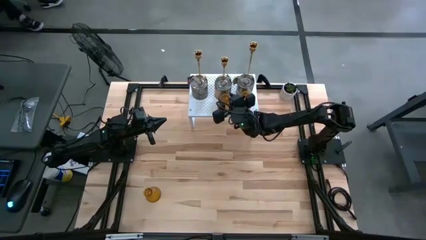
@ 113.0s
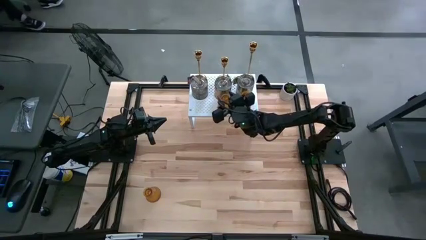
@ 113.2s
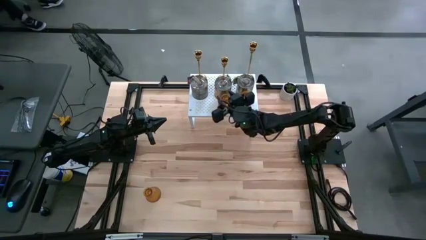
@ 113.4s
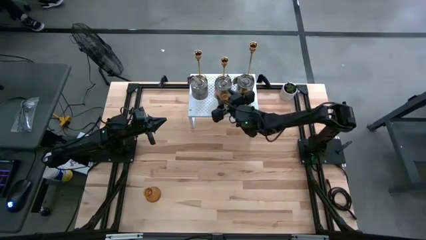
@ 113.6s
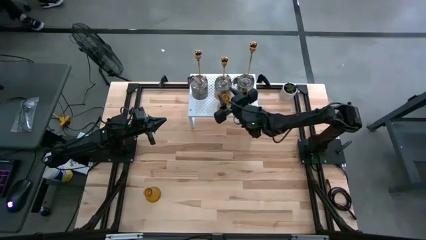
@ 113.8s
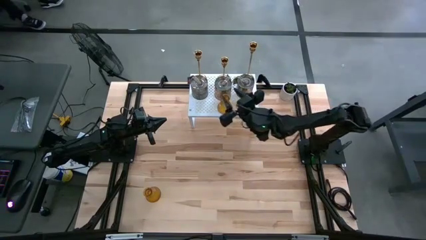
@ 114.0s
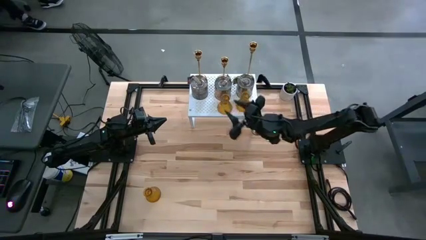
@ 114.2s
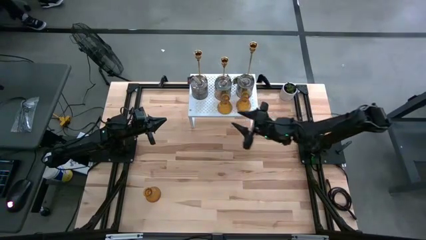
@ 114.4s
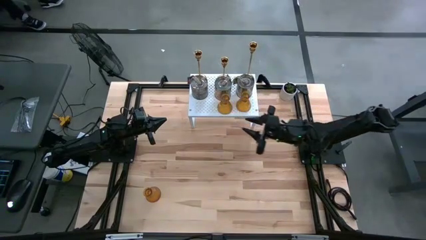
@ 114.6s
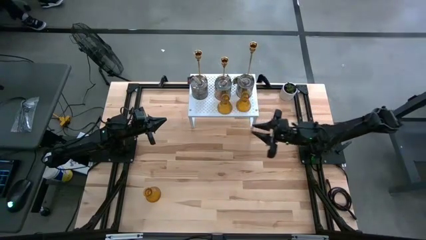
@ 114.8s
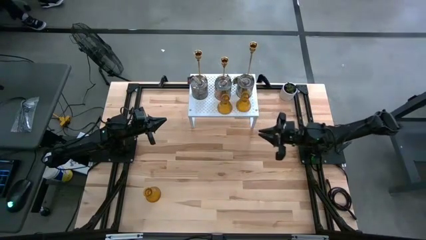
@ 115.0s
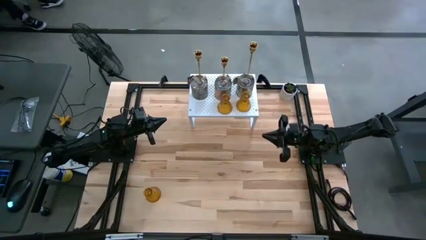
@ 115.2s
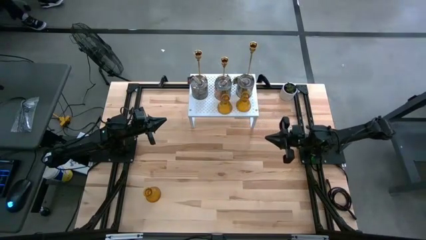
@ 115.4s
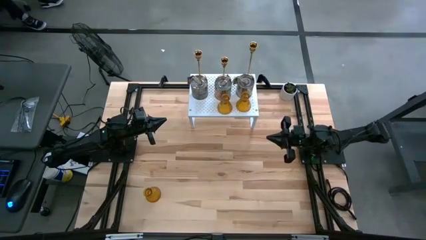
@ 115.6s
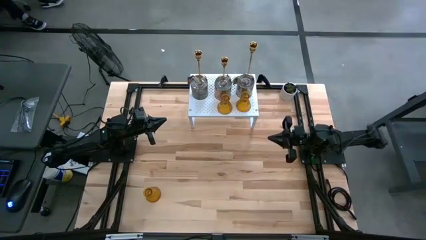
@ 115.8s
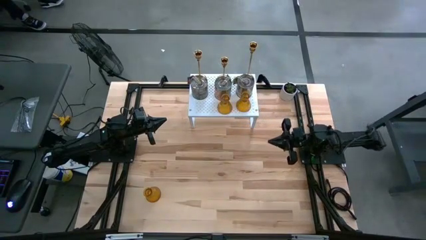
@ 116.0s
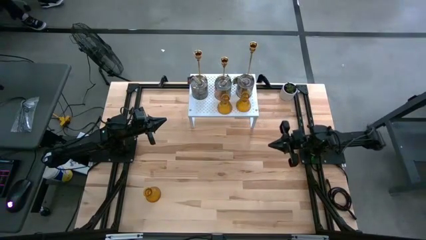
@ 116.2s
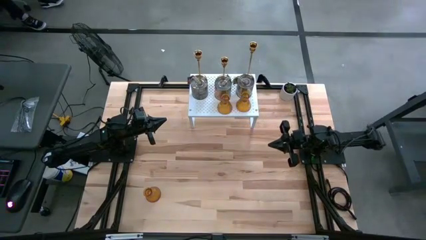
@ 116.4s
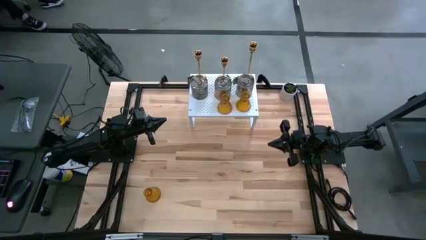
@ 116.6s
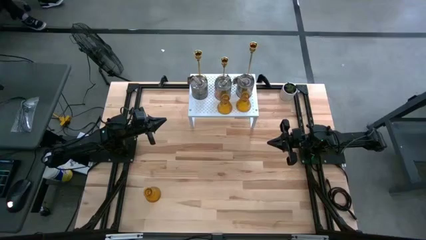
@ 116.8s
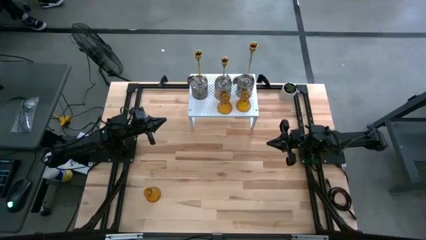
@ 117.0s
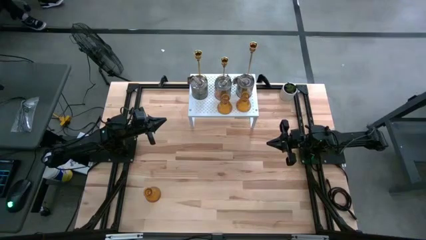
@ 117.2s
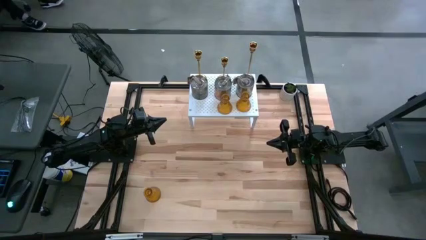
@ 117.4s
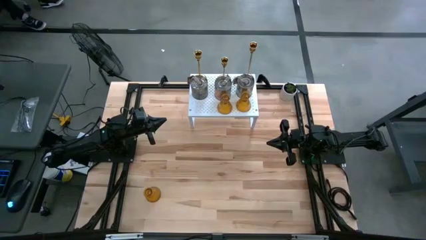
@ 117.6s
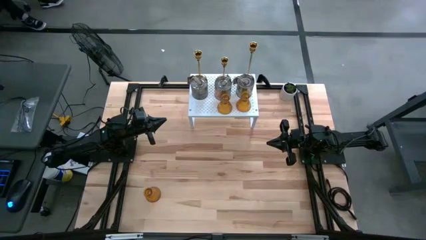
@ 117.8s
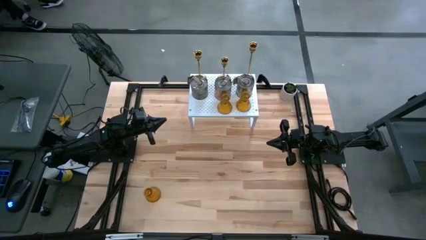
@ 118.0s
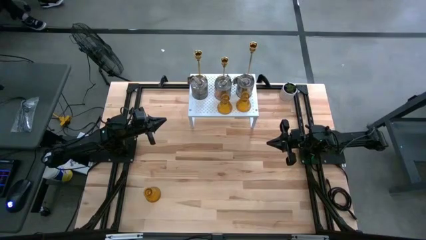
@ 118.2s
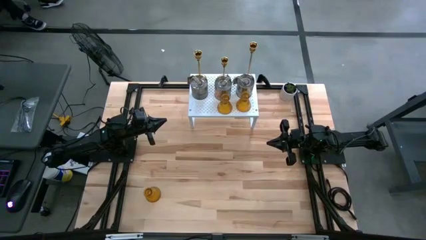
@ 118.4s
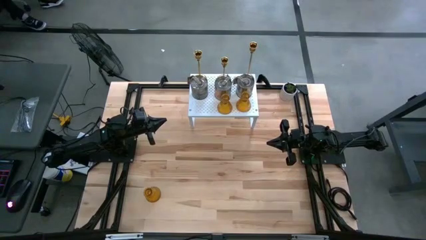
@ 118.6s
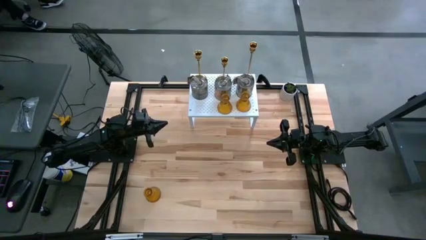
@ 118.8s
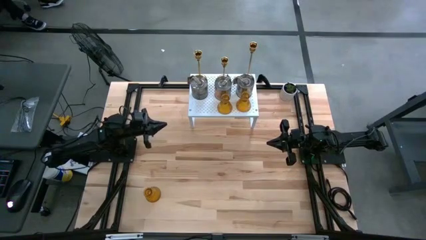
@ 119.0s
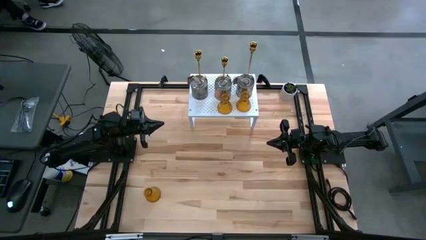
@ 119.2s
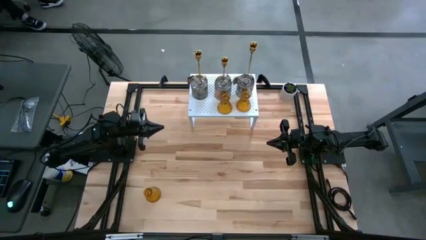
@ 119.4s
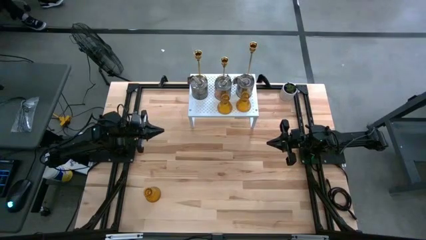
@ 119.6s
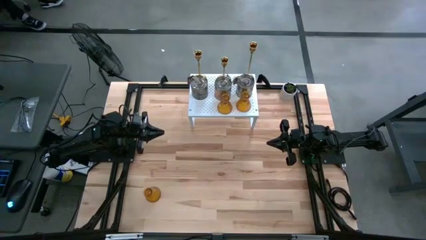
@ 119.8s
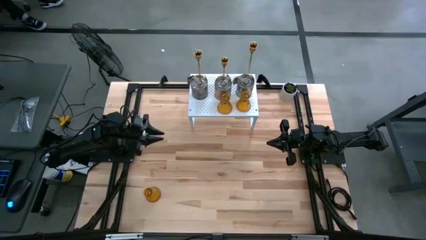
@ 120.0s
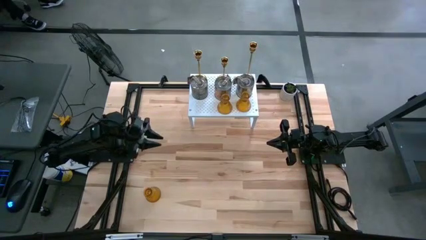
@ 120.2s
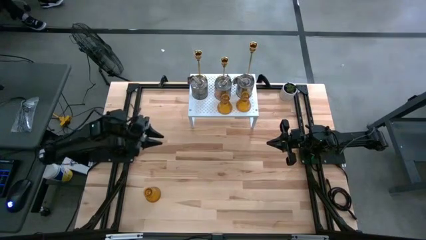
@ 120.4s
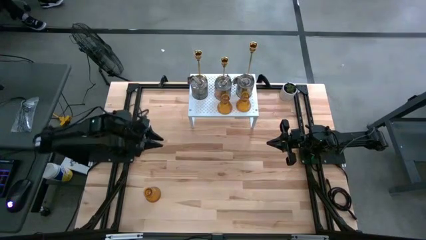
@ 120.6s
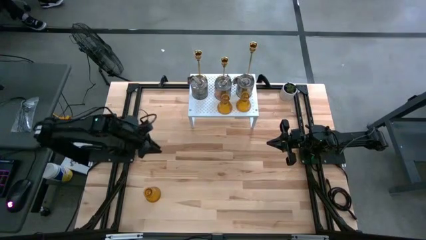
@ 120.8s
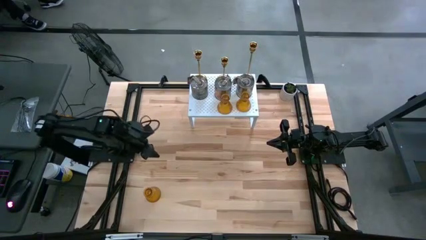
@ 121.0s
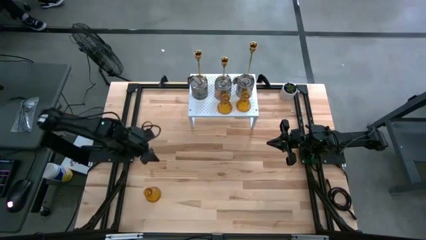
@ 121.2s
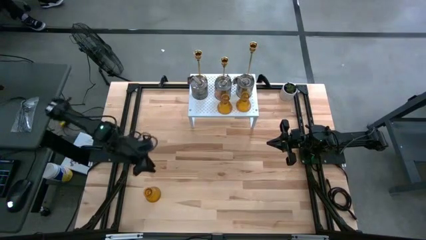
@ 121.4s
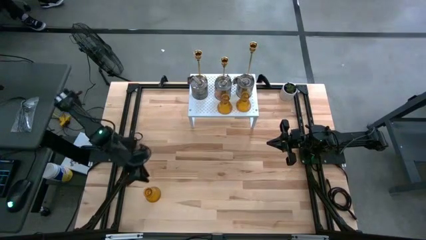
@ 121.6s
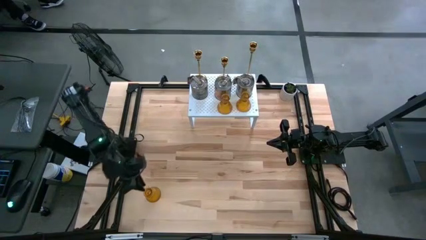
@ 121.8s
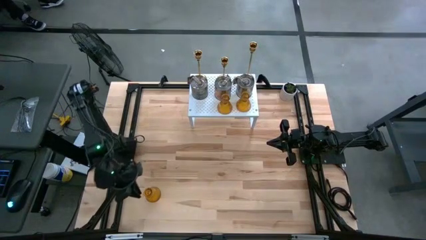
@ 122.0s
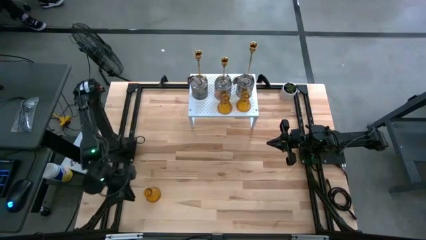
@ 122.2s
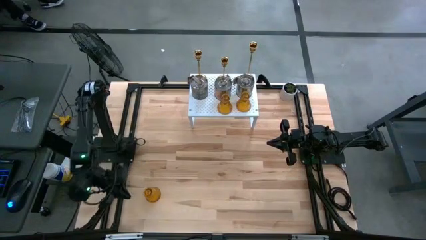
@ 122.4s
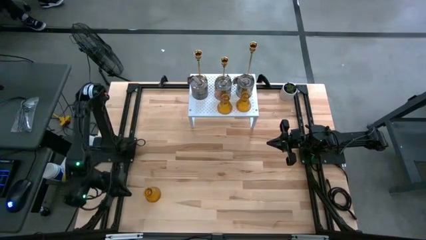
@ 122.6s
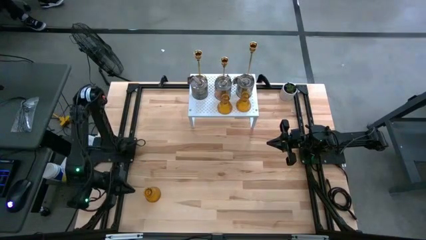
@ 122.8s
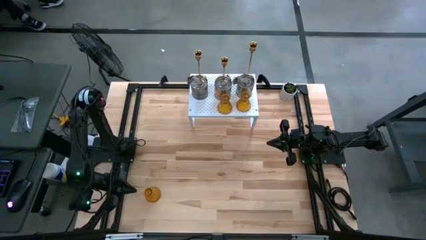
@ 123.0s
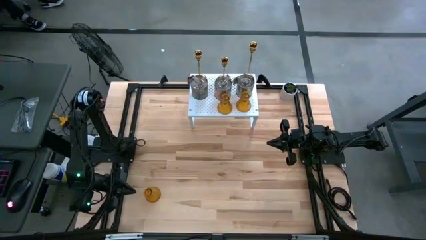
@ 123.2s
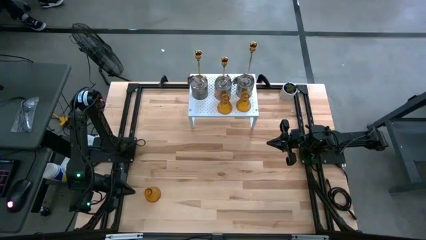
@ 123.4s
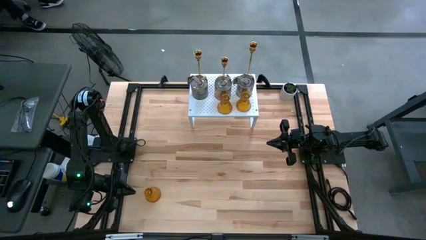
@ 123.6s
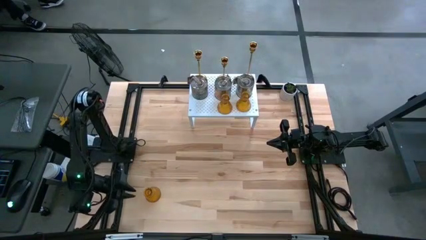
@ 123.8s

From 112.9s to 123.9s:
Task: Pick & Place candle stick holders
Put the brown glass candle holder on the shelf

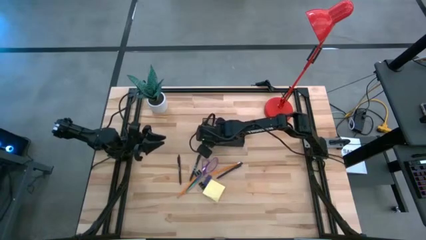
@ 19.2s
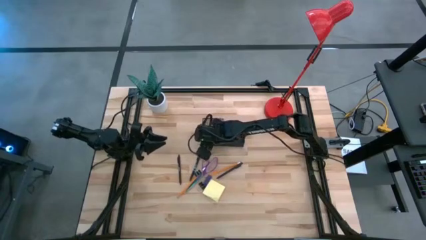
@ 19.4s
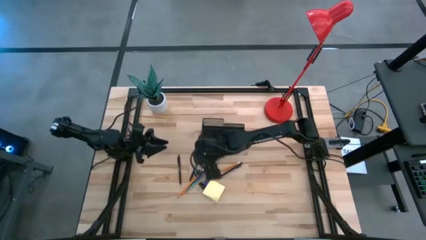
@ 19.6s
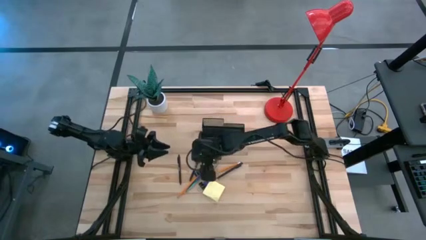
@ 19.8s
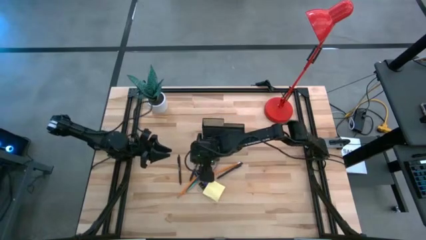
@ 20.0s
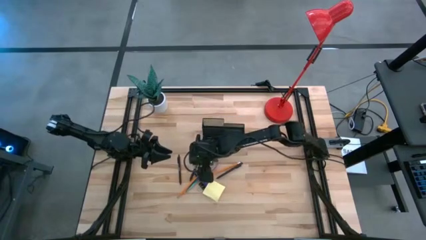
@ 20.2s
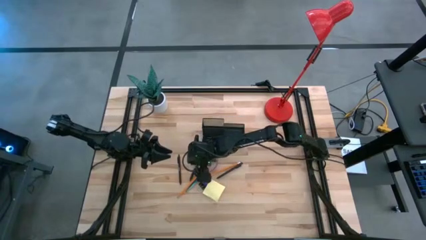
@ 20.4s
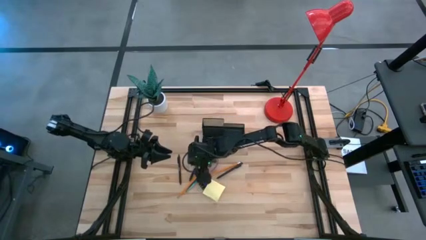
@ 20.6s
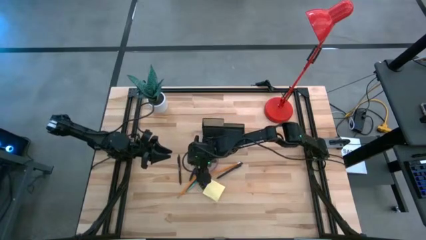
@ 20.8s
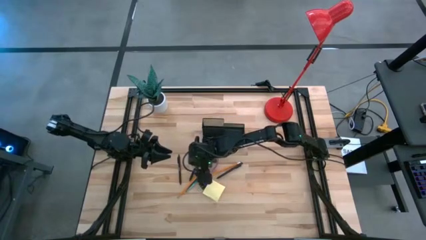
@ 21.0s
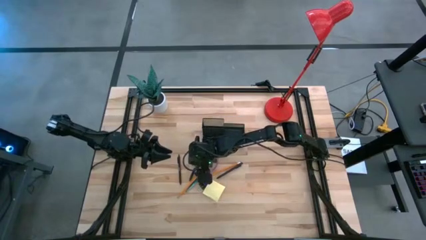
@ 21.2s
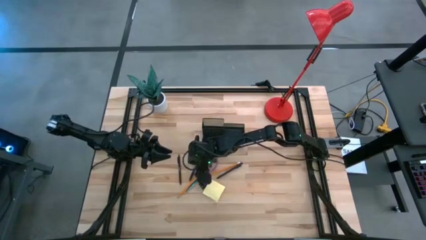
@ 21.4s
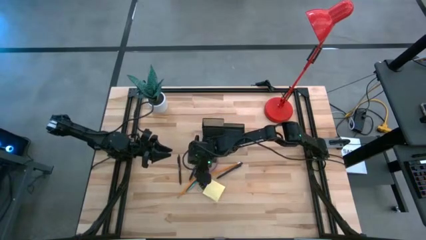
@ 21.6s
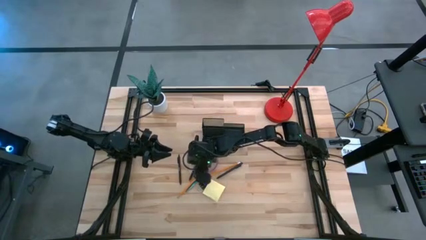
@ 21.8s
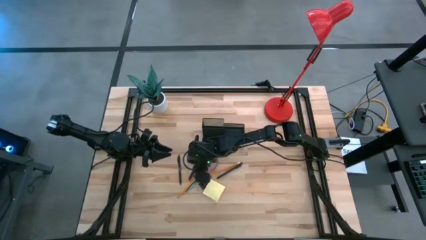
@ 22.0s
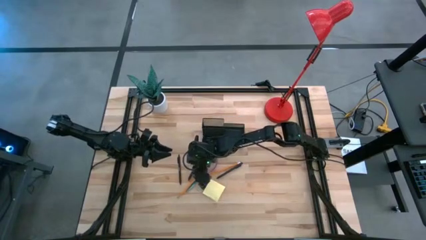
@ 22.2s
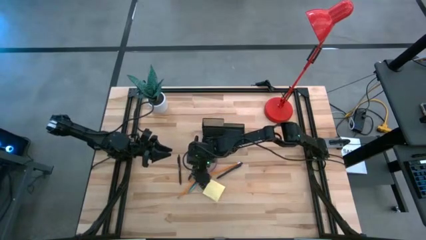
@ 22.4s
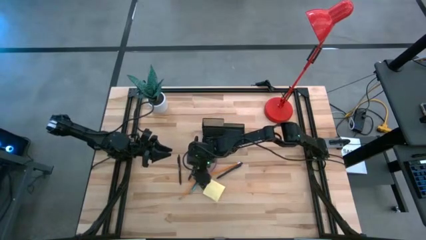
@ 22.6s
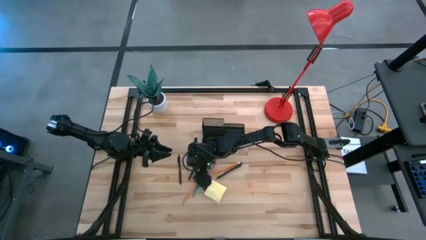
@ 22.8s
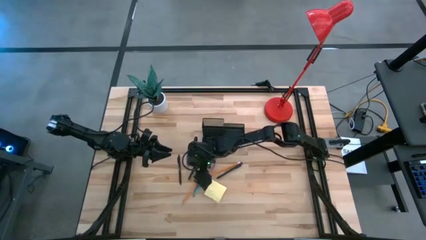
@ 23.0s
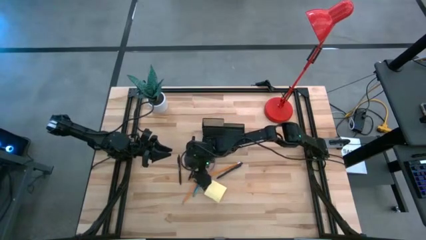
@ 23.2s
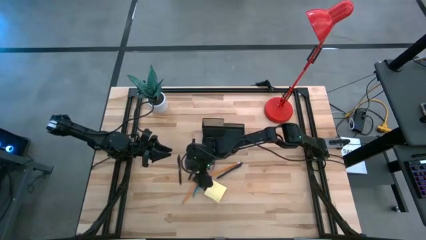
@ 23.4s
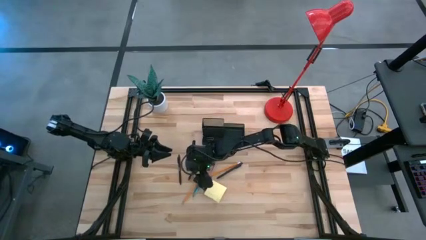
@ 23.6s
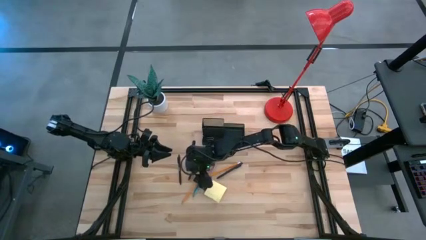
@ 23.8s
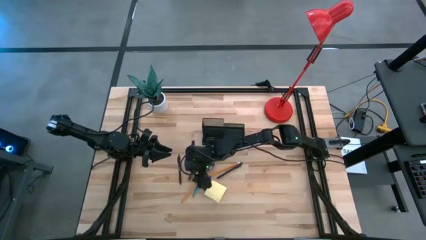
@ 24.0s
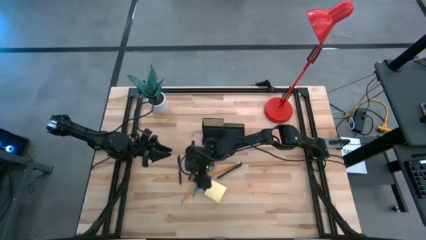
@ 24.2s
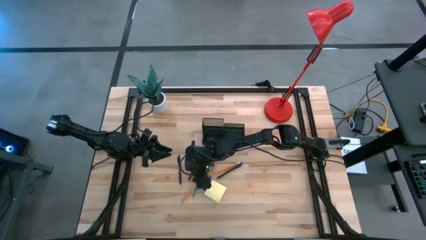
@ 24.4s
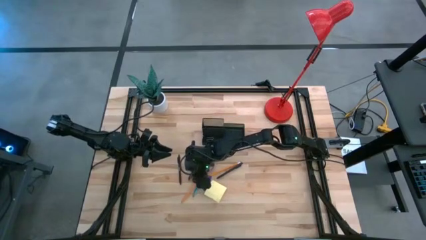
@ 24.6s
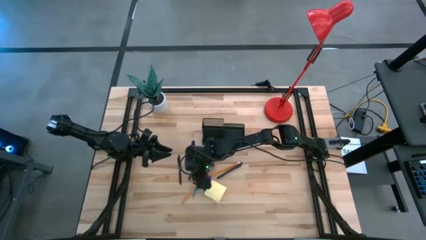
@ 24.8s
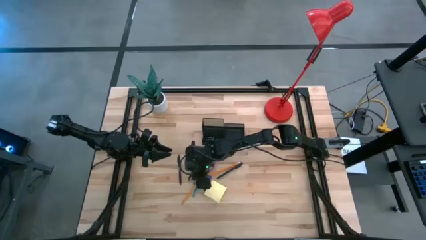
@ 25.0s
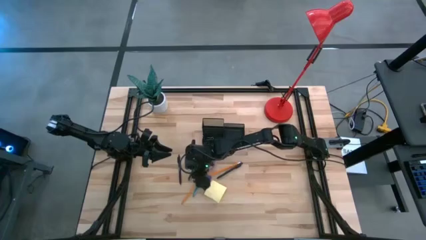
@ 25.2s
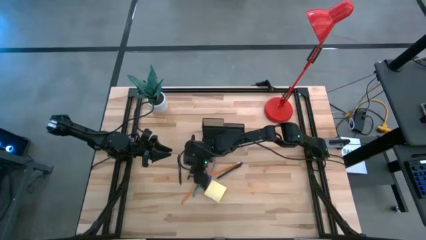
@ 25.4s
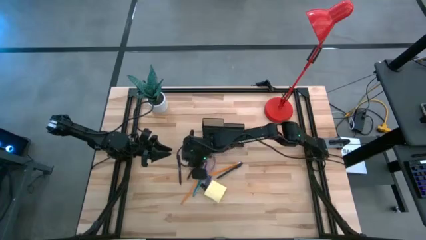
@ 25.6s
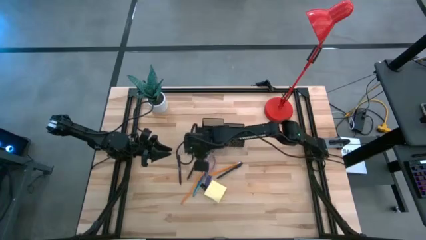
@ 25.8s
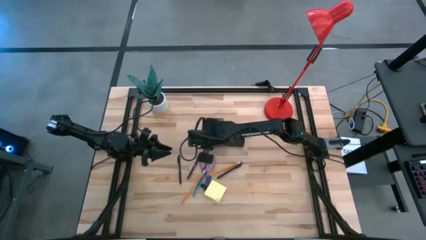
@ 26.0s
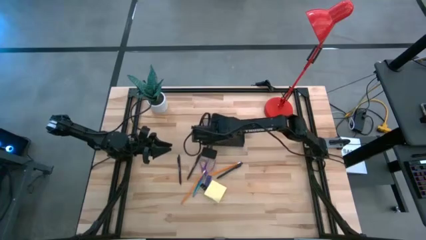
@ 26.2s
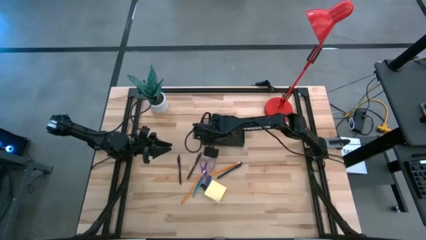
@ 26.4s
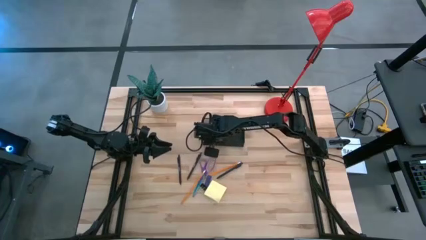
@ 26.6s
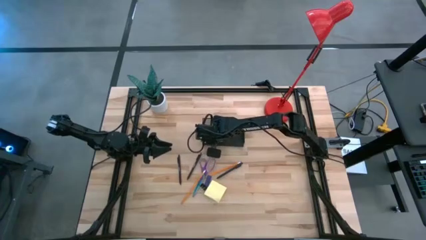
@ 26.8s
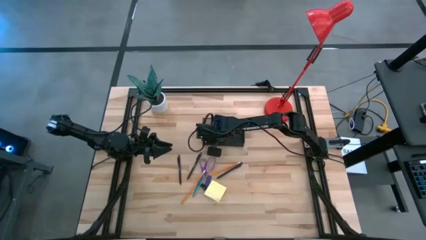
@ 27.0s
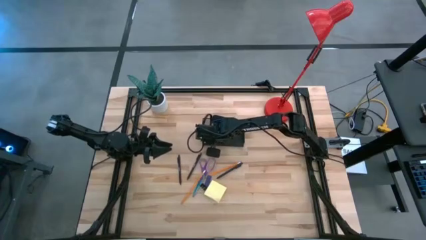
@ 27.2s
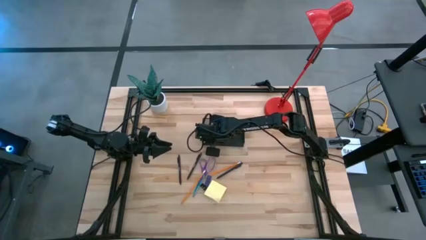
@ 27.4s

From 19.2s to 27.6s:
Task: Pick and place office supplies into organizer
Put the top black binder clip into the black desk organizer
